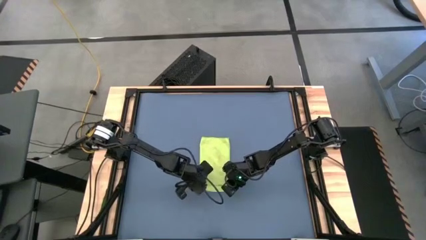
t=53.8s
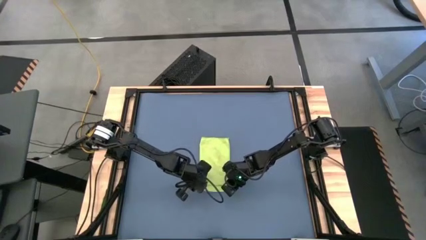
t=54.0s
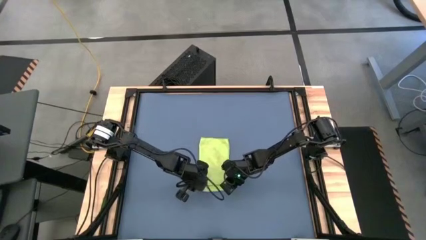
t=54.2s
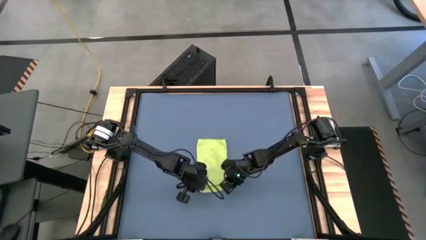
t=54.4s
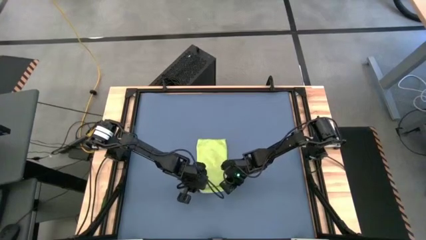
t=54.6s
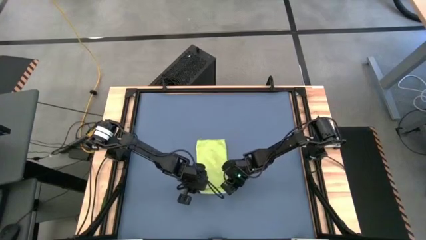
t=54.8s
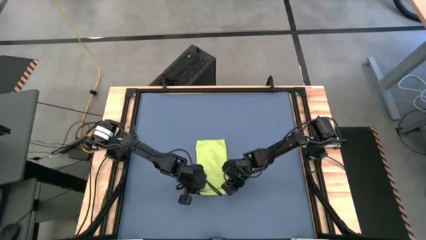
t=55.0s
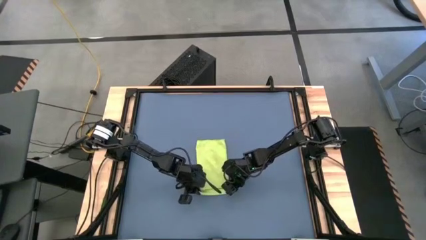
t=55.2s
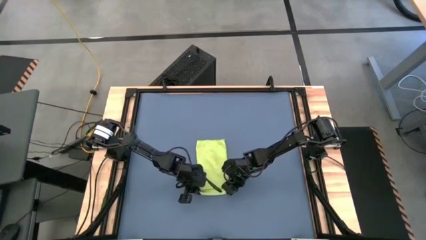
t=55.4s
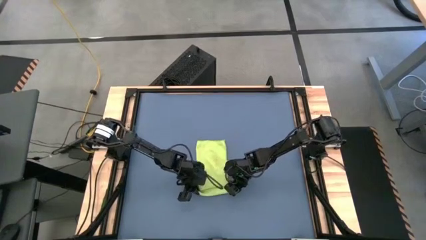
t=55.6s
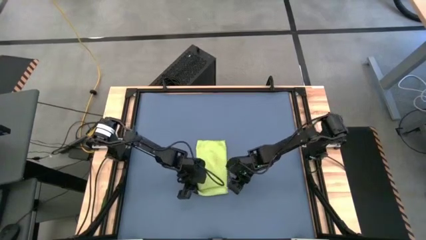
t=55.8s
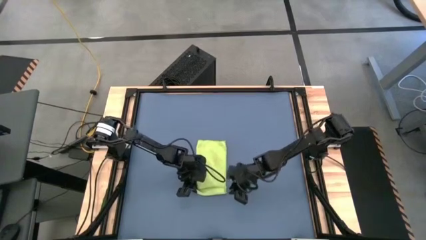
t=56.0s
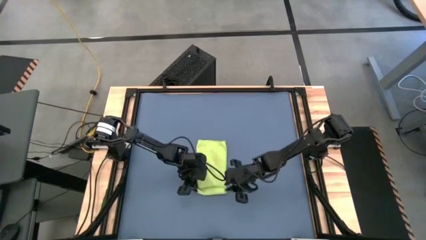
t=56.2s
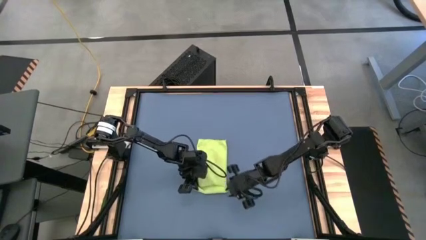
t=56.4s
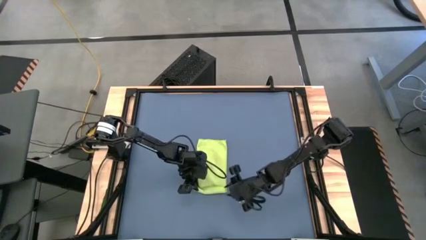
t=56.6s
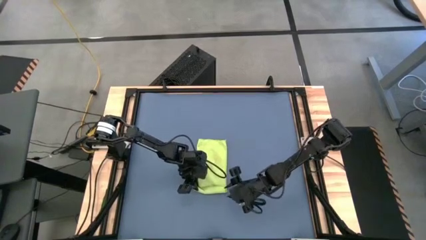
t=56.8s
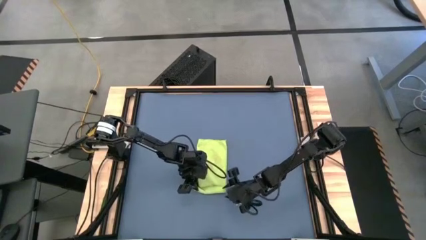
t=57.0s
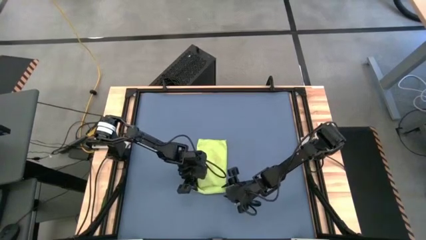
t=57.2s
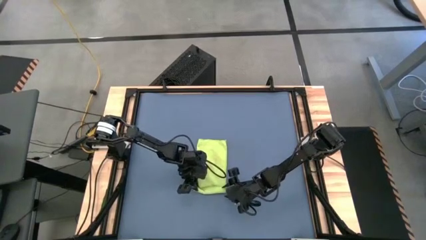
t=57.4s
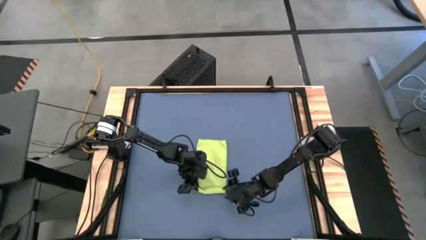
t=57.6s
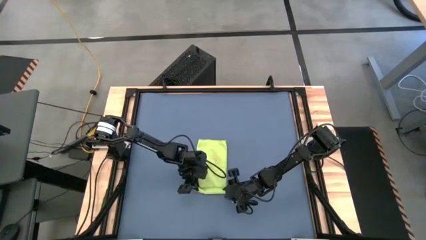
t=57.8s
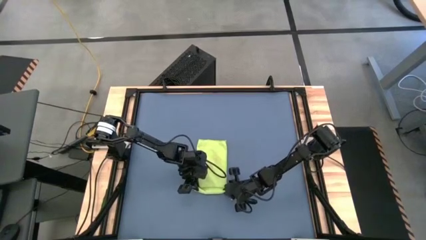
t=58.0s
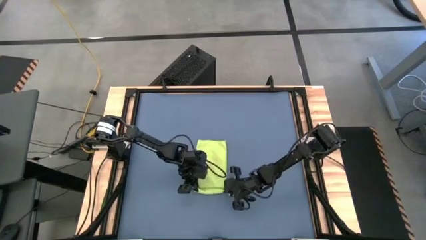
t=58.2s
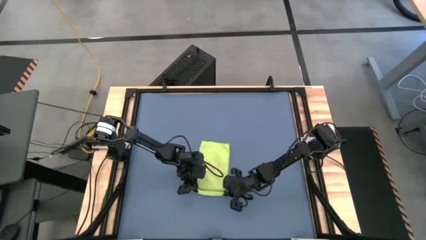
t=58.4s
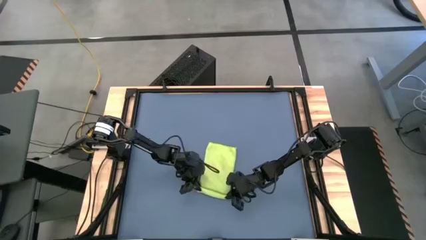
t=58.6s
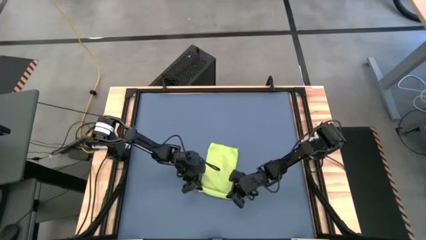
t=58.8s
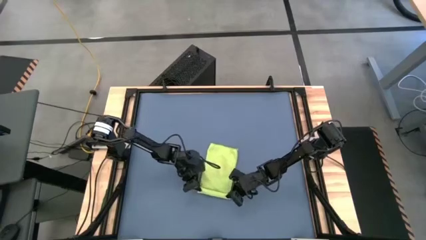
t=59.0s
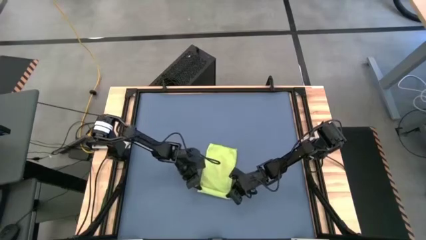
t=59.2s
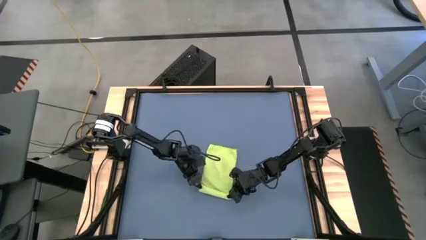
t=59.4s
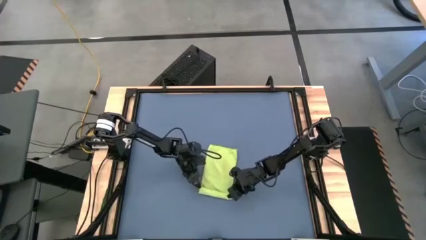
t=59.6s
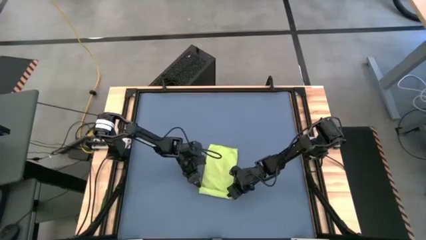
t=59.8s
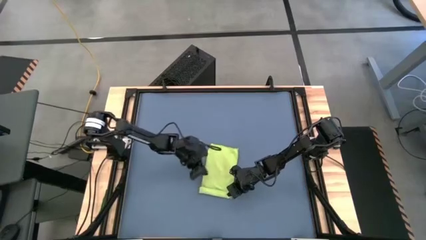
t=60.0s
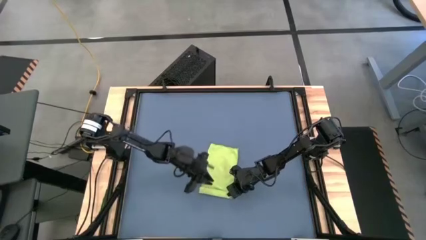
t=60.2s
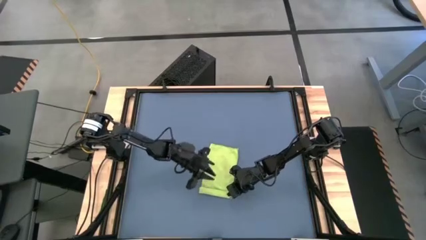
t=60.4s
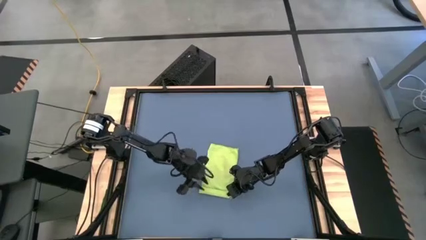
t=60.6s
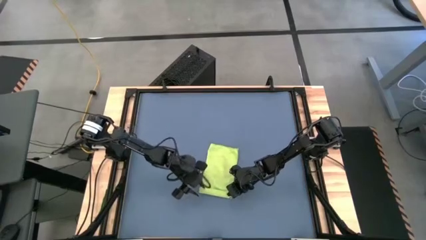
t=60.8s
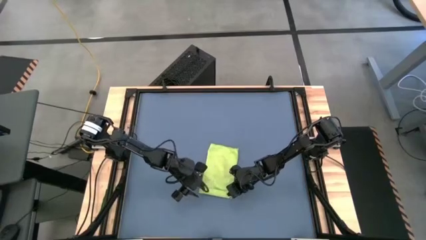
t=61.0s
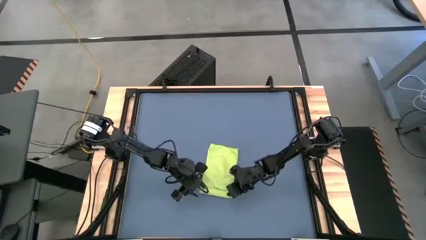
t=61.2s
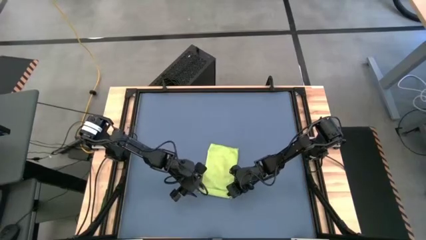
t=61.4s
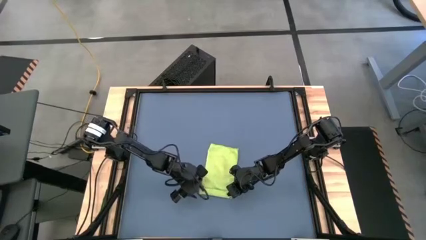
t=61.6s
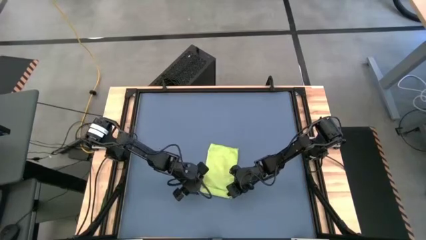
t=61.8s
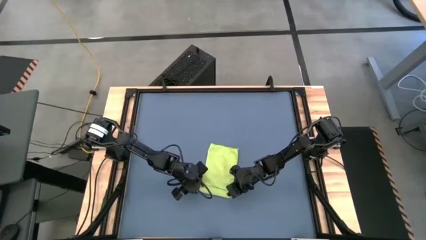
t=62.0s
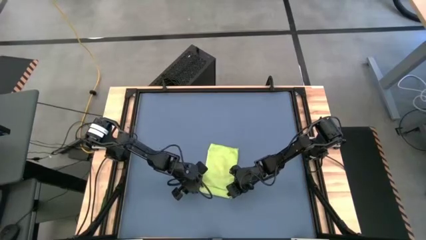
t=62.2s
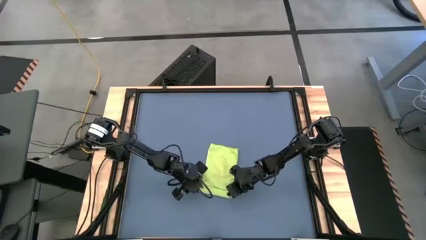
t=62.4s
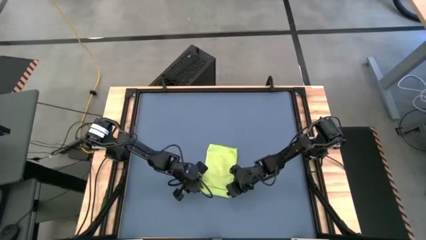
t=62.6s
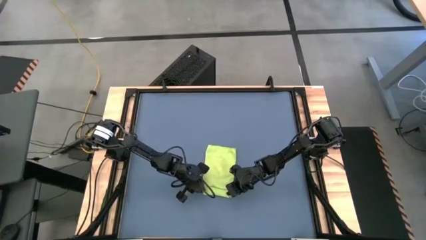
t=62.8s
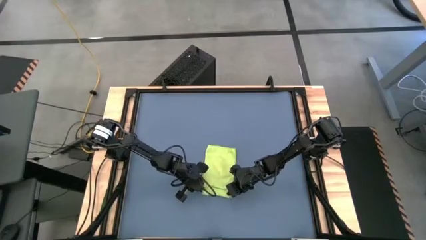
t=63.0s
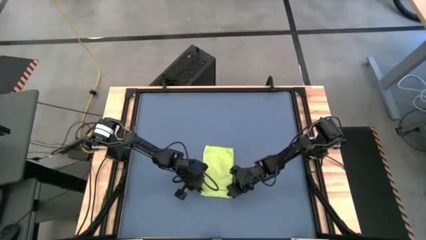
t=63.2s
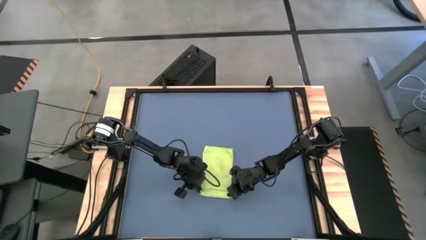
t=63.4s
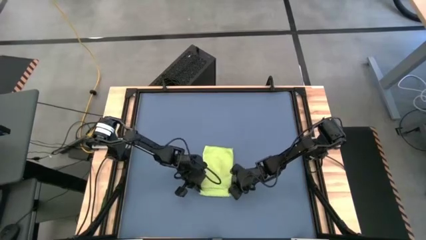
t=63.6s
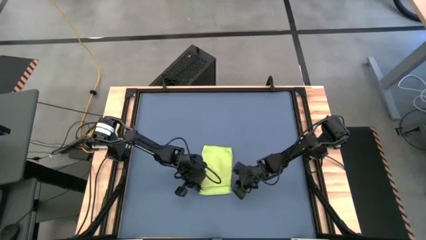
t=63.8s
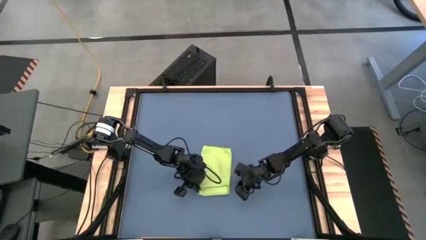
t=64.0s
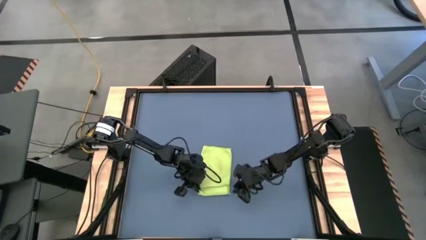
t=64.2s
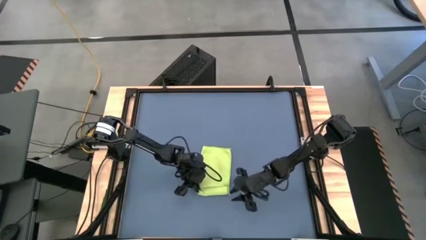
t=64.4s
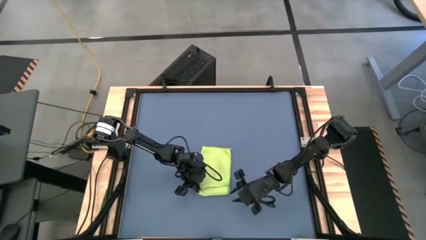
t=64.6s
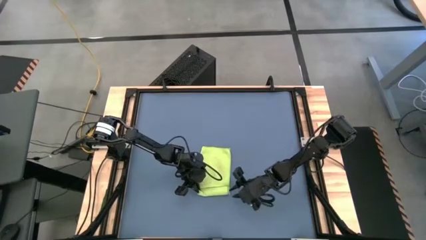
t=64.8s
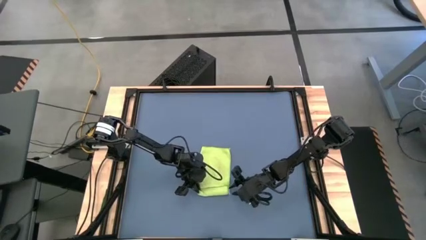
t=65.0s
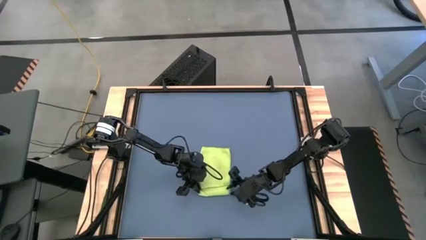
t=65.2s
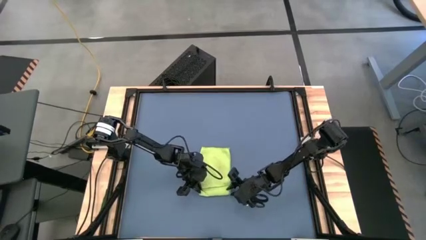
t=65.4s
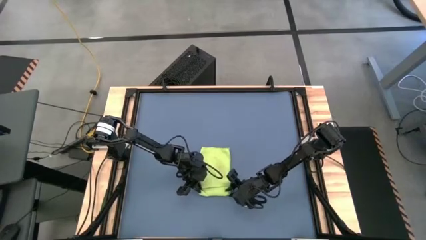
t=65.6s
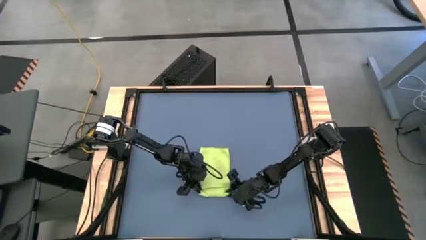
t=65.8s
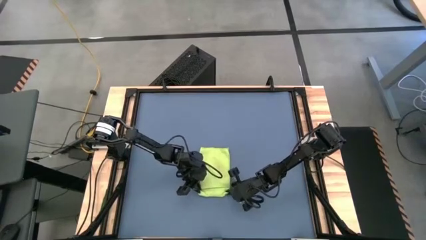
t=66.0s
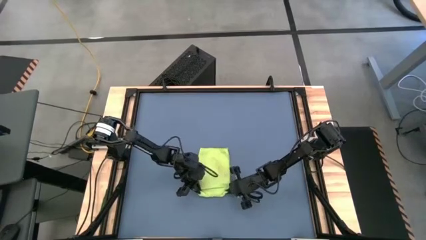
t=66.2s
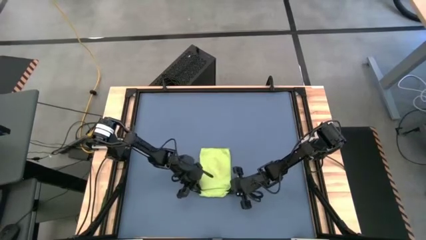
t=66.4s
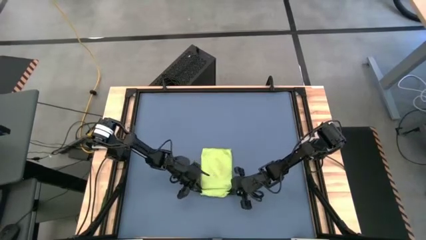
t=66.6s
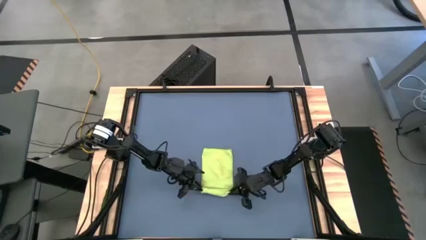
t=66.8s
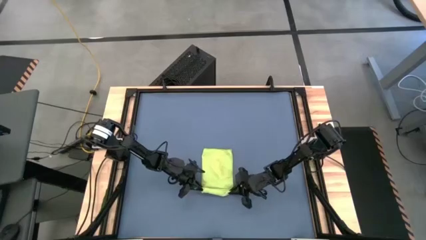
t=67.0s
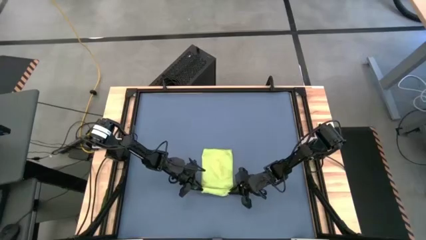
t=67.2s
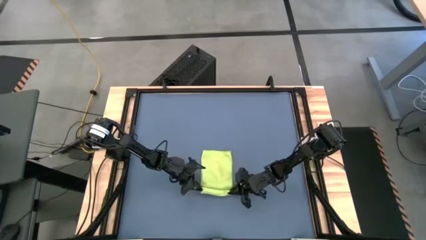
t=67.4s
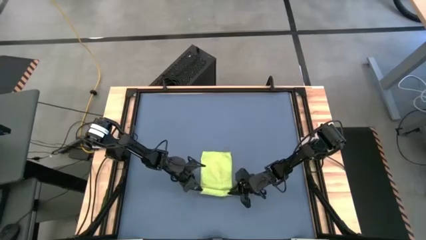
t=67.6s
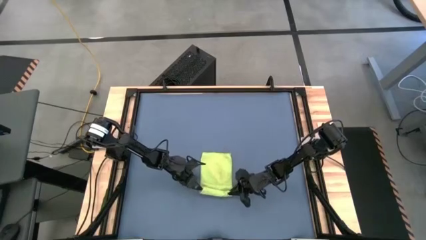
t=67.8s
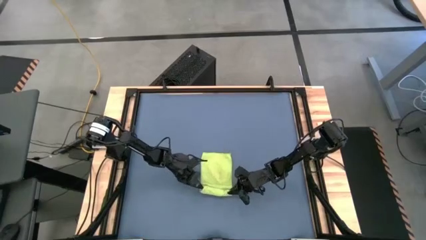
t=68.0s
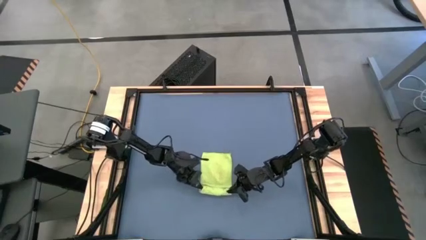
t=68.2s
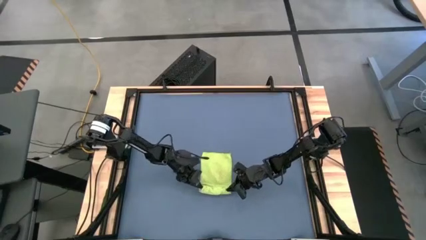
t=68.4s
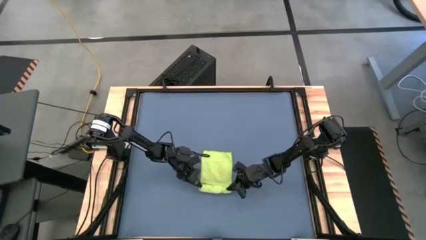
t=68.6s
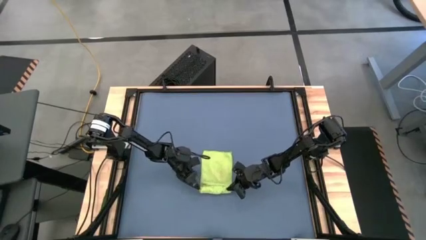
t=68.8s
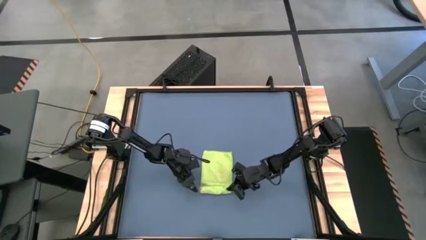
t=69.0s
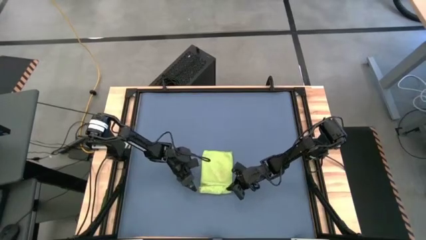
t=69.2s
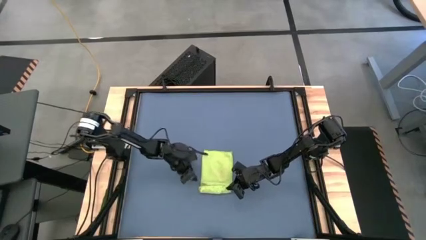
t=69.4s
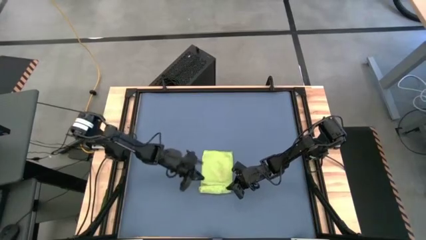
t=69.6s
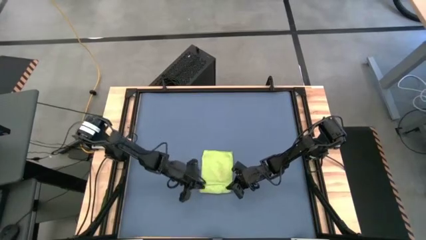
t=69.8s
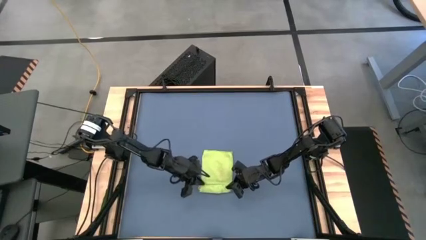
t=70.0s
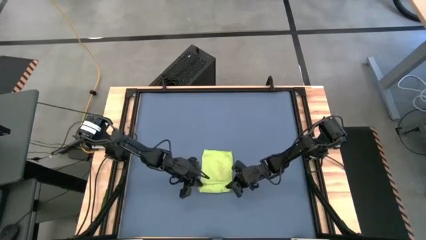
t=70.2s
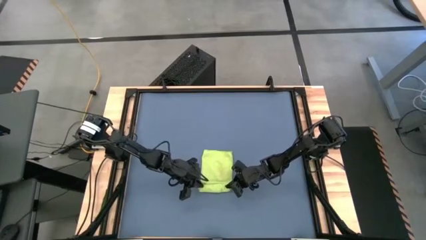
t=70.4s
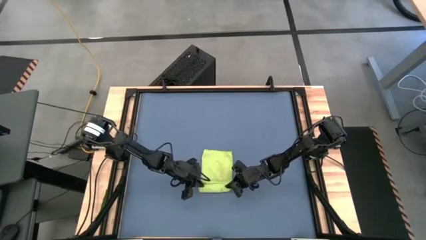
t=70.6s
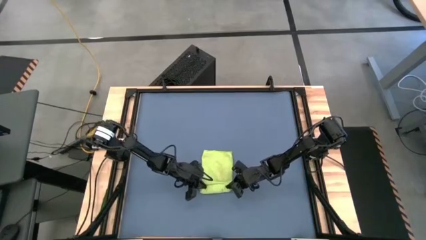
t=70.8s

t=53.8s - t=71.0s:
Task: Roll towel
Roll the green microfiber towel
